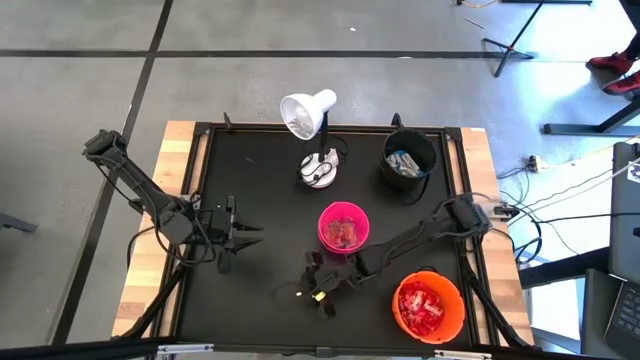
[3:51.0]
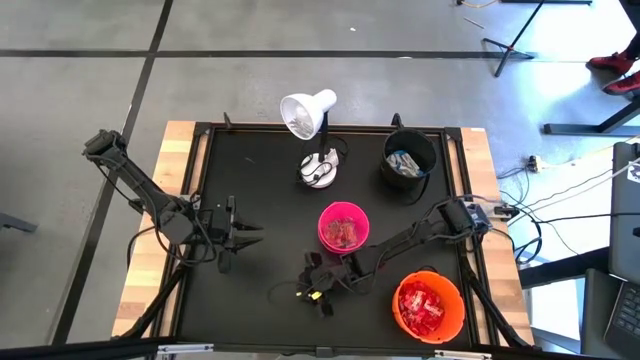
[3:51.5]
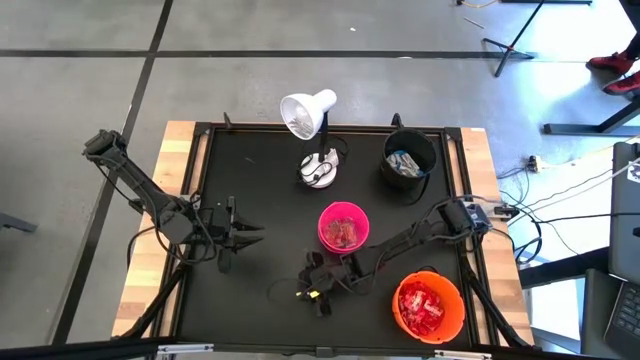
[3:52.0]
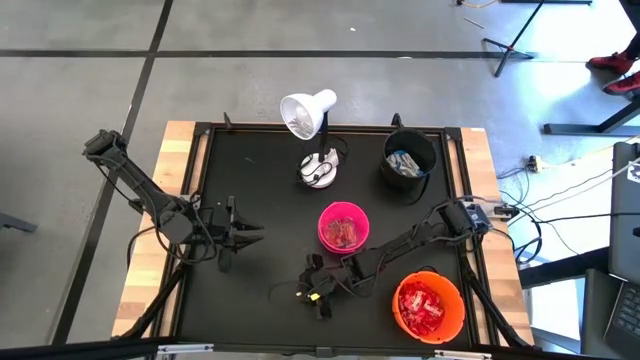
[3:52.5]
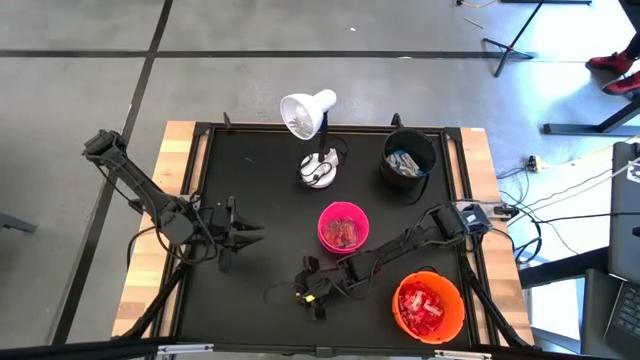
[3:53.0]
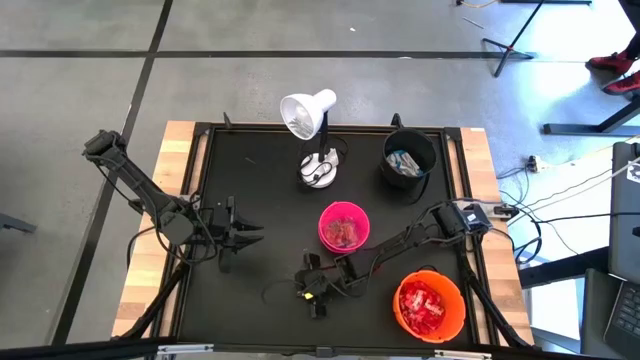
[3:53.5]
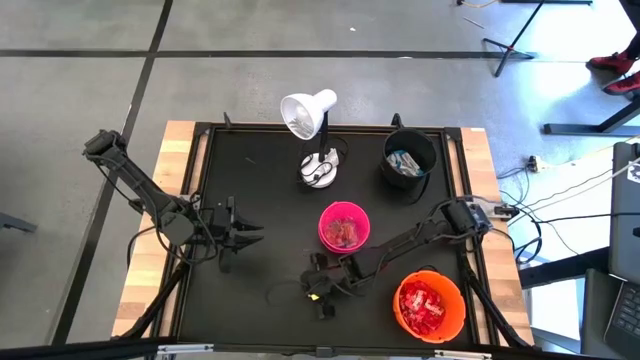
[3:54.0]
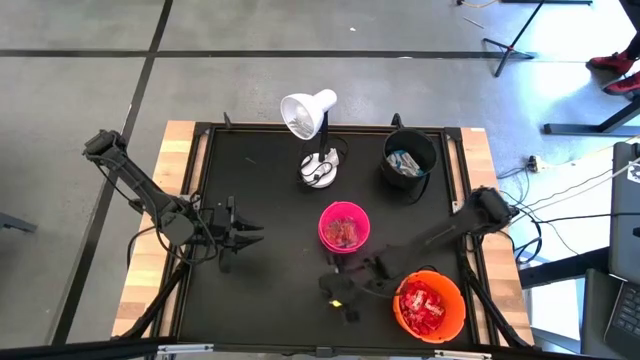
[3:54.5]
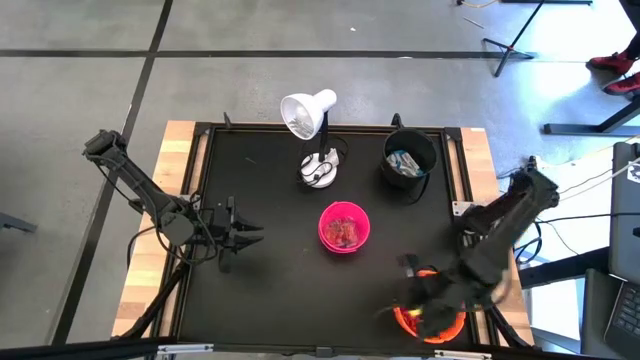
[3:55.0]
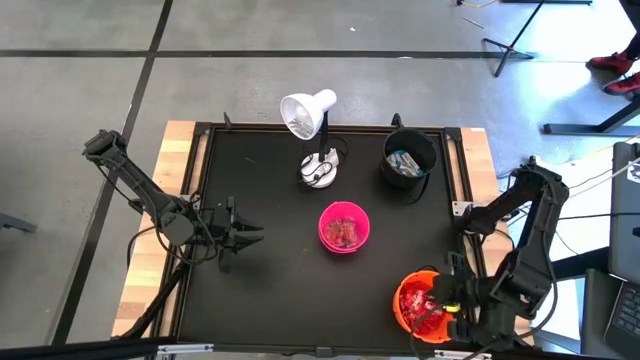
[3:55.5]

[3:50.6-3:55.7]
Task: Sort candy
Put the yellow candy into the orange bucket

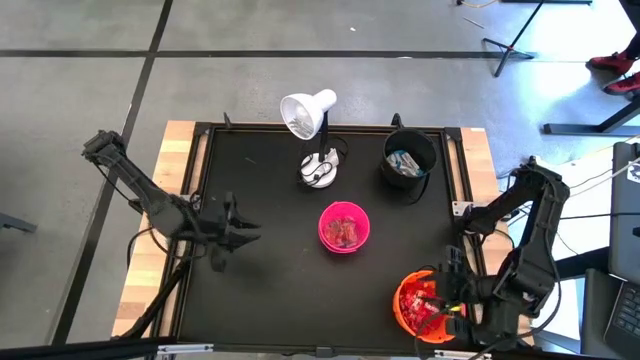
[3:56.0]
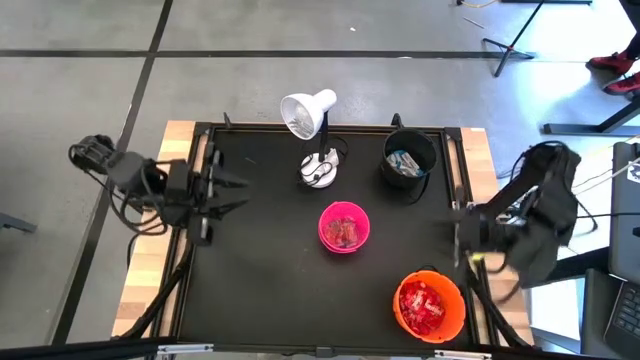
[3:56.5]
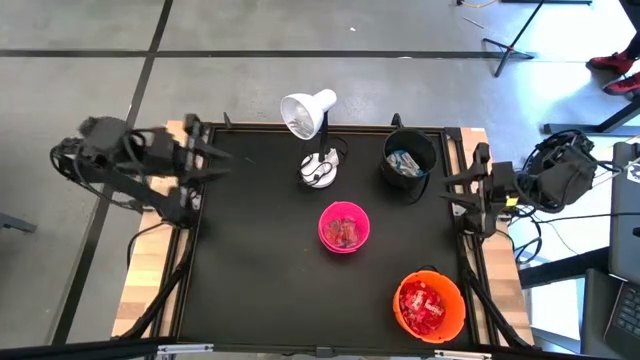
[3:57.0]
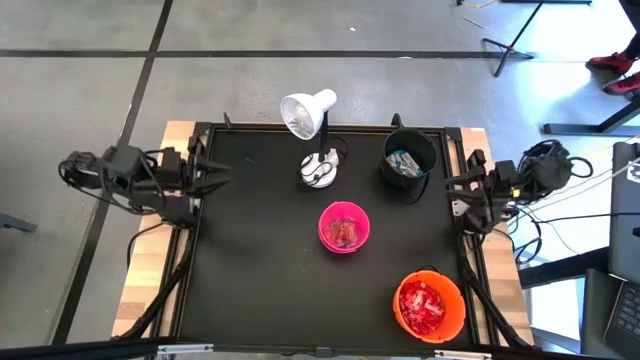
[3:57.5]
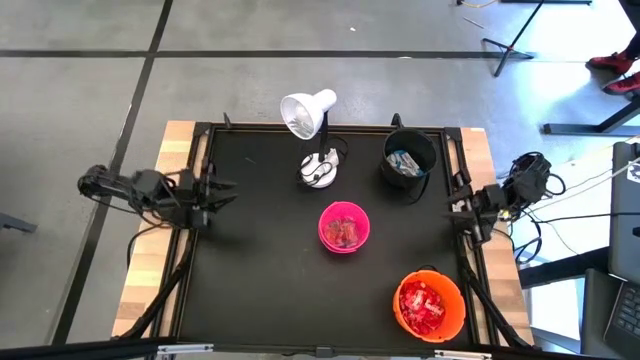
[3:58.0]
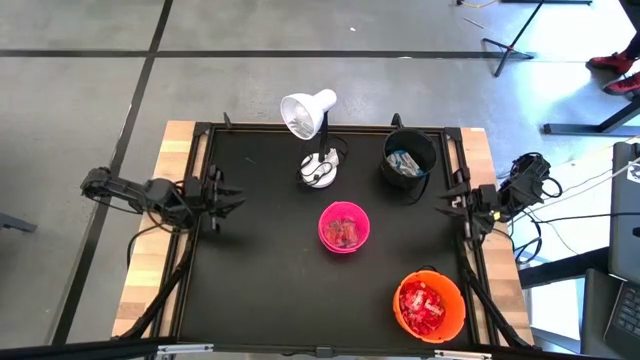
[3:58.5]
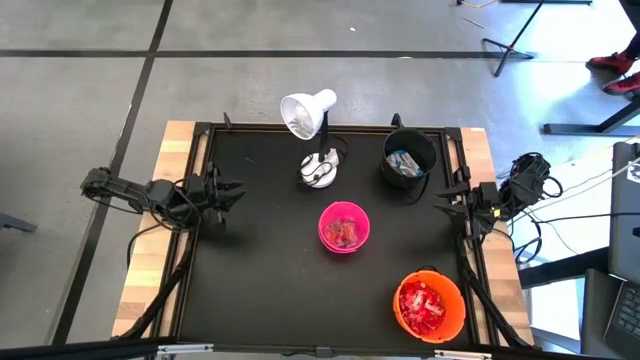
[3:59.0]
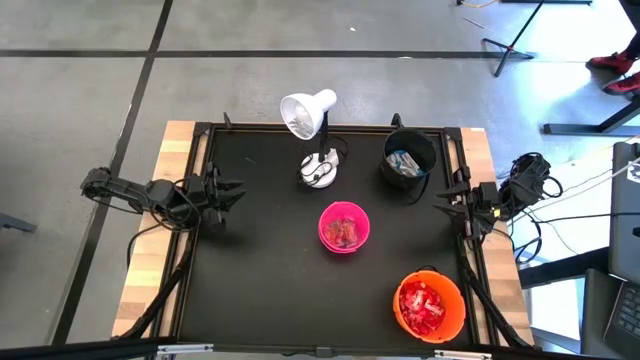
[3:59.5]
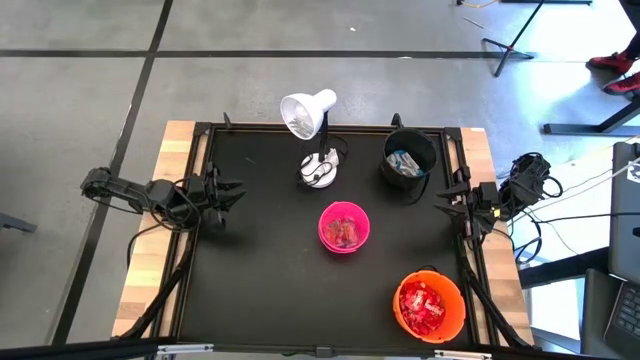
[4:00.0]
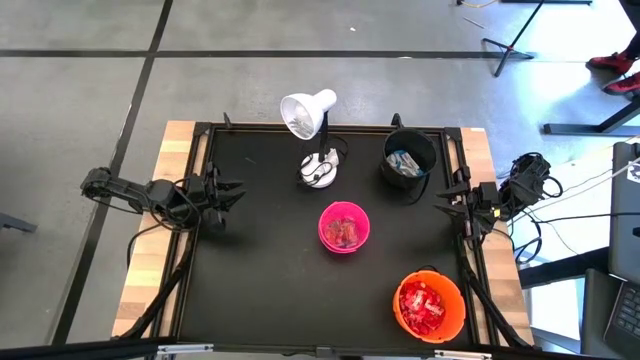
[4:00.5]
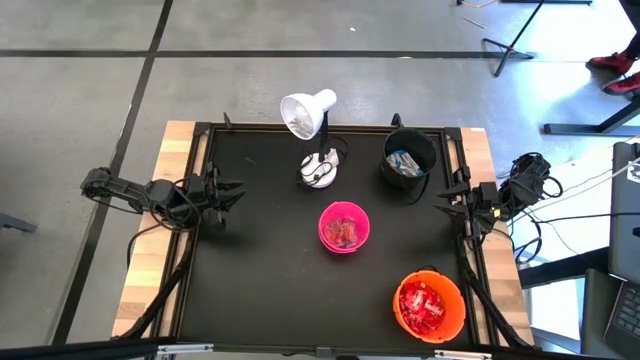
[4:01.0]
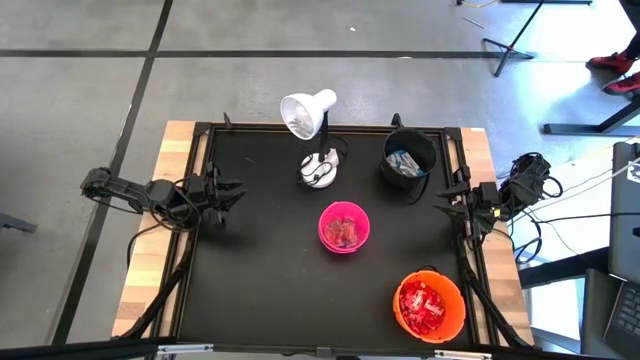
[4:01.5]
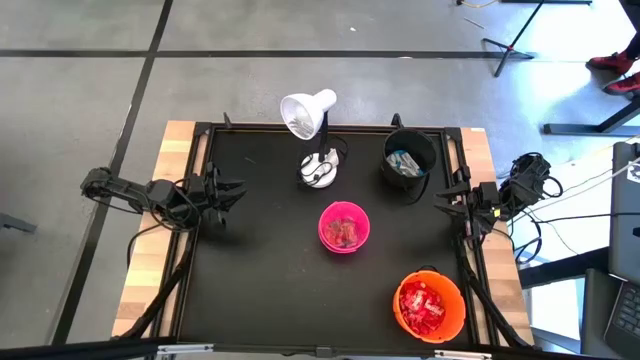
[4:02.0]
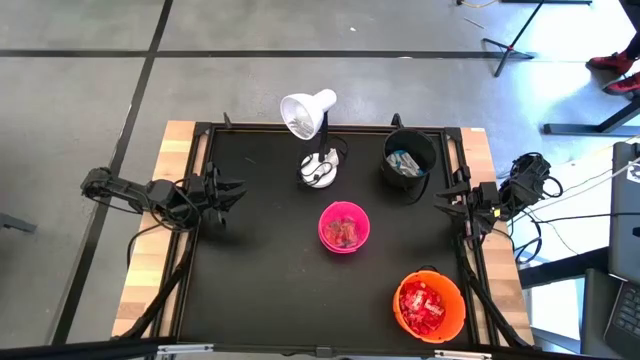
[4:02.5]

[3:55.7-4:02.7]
Return to Home Position

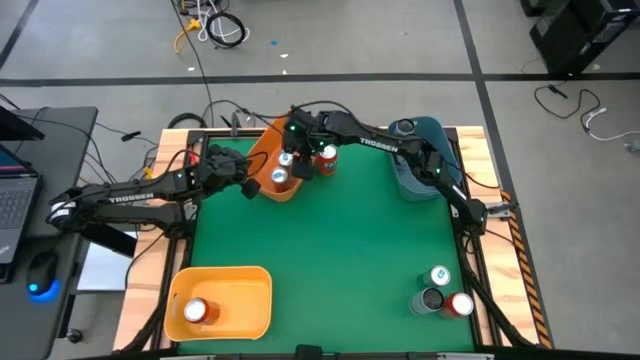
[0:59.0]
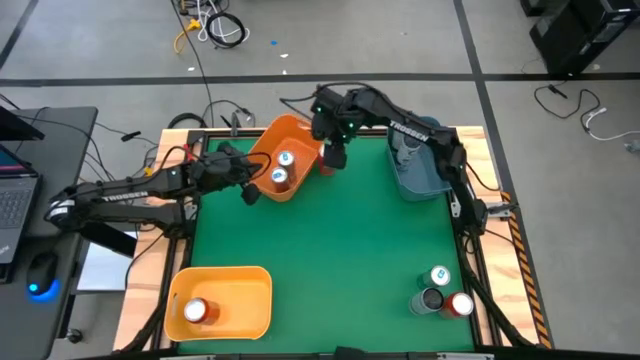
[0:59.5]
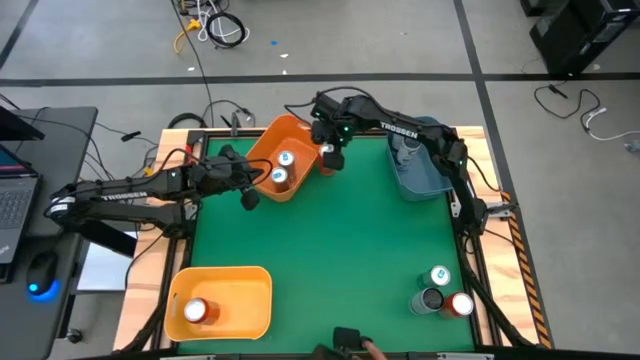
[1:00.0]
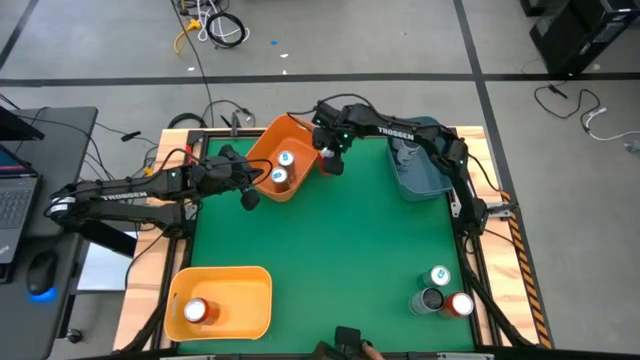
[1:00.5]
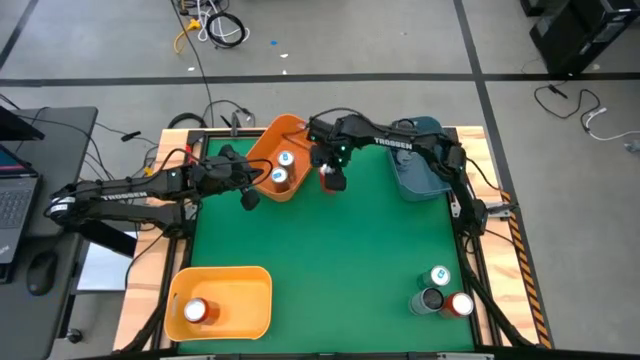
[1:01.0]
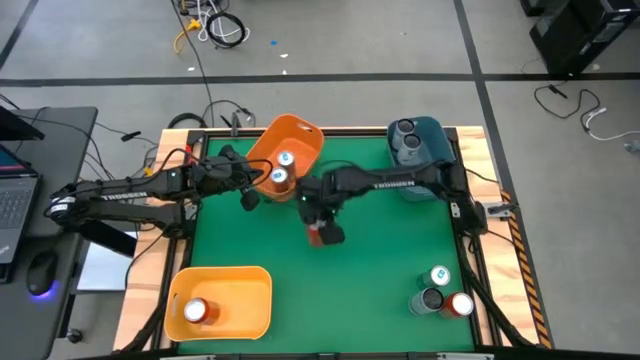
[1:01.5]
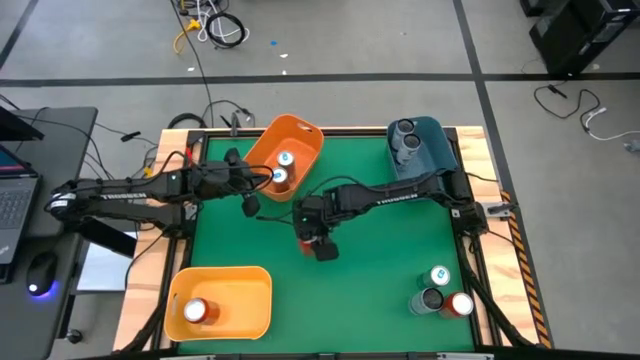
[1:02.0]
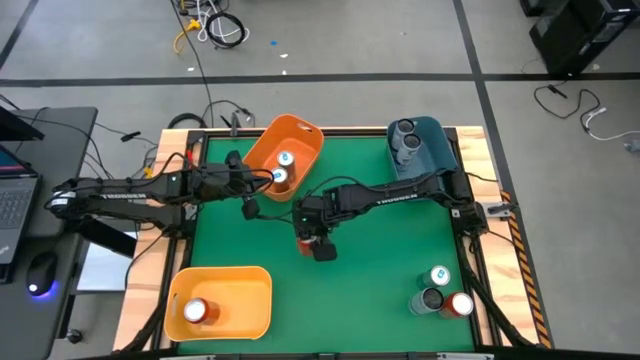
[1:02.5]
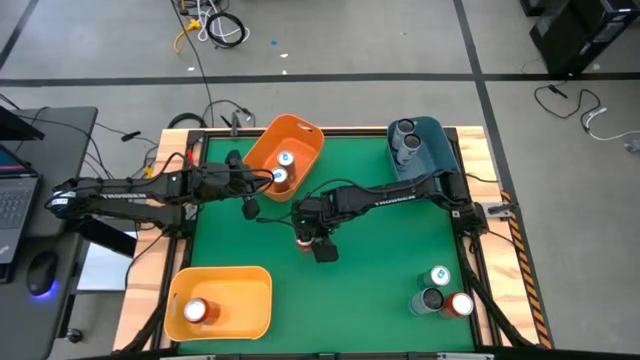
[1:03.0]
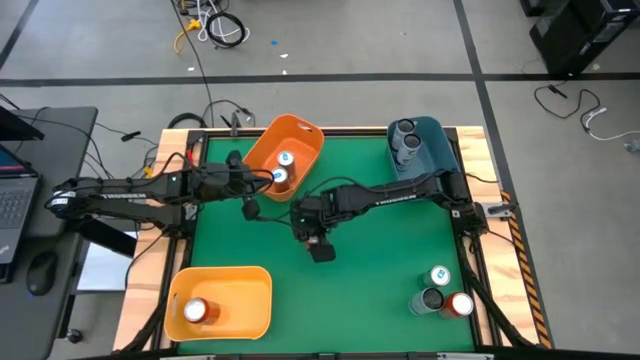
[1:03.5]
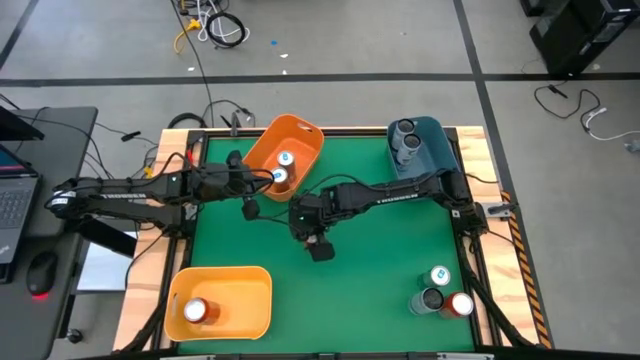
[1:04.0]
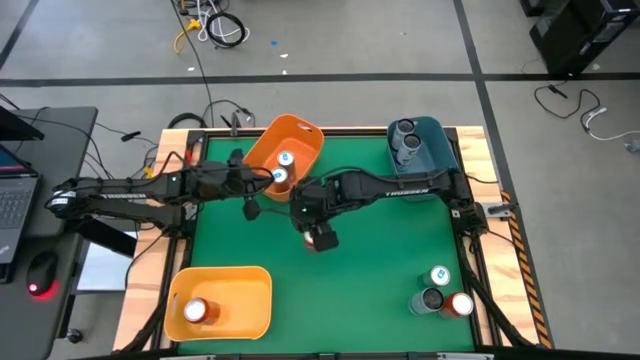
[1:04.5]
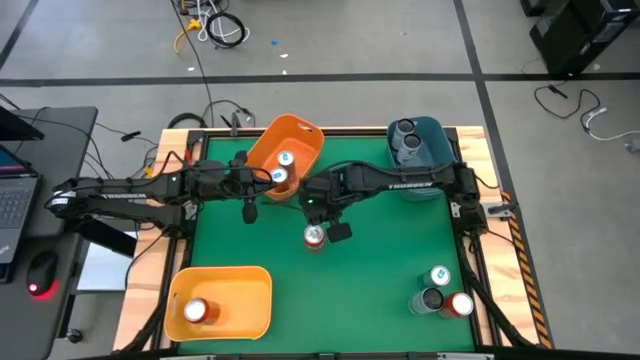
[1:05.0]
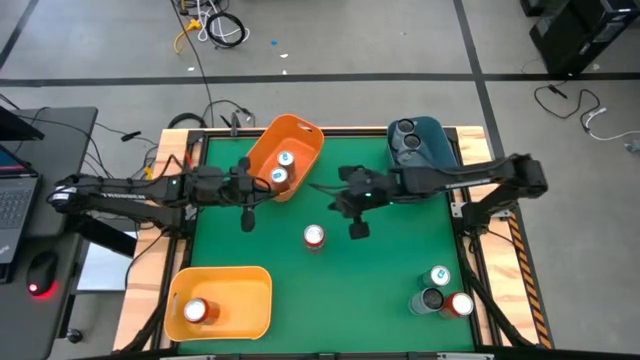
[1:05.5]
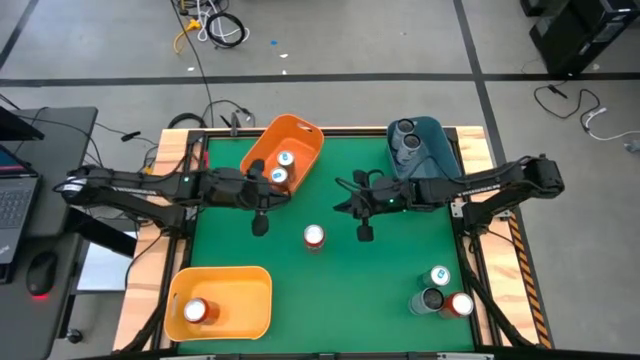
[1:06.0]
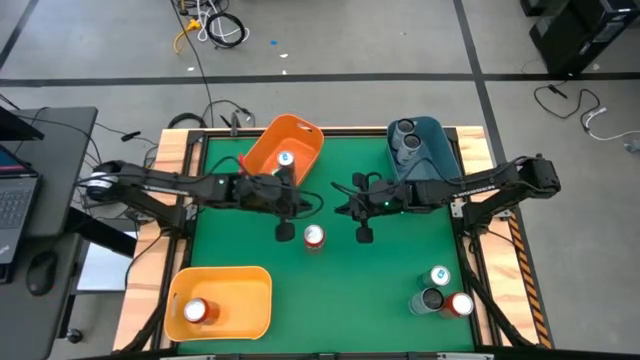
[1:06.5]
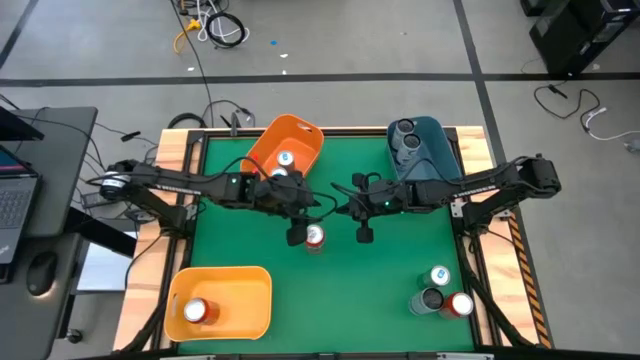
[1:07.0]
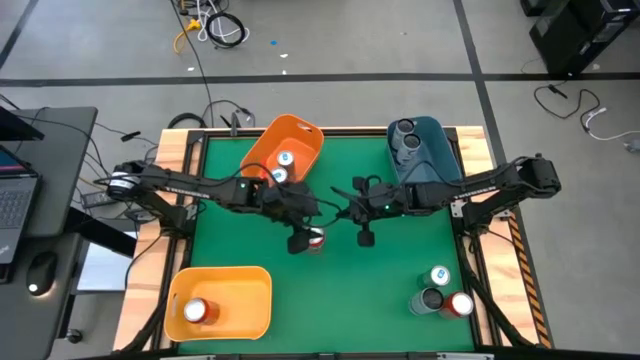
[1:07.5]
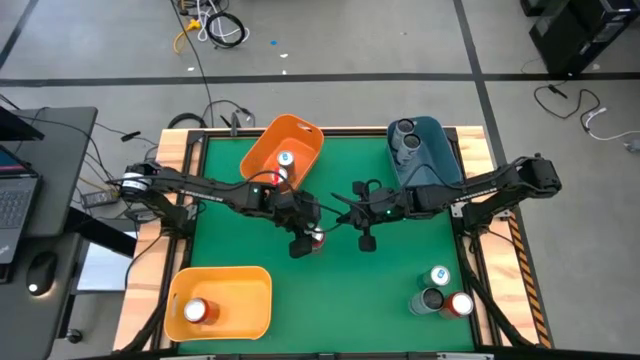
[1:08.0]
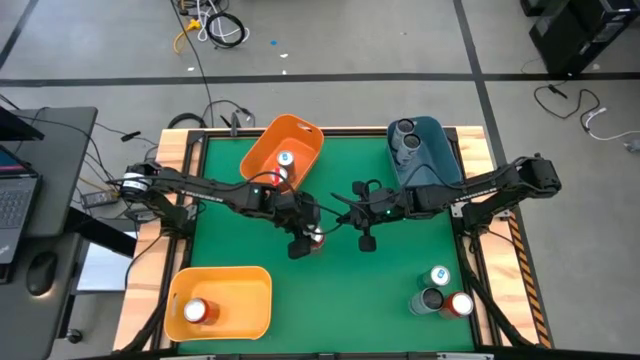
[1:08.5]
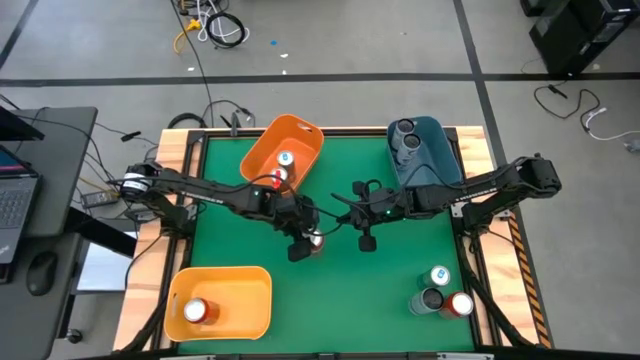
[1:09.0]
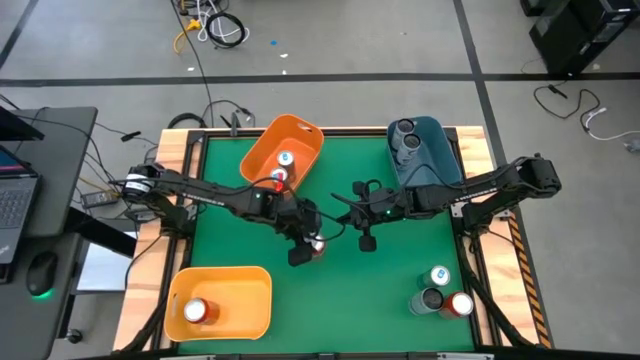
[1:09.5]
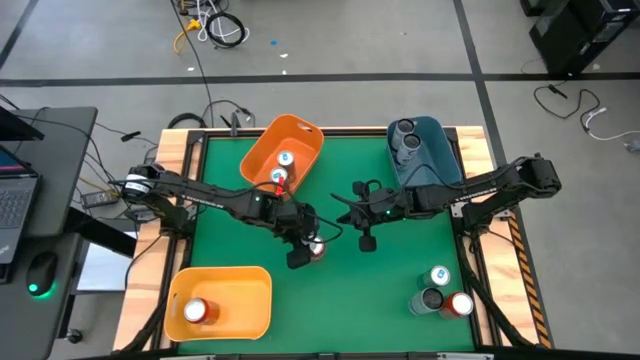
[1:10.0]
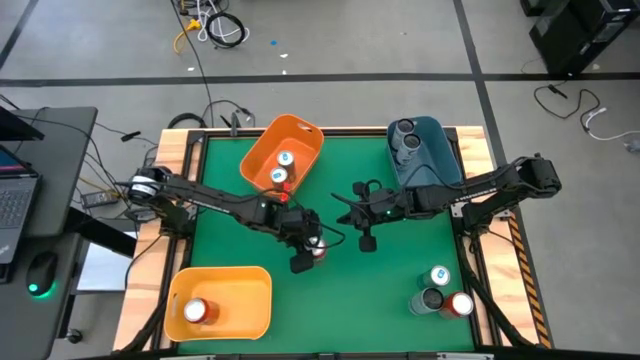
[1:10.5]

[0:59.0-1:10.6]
Task: Sort soda cans
Put the top orange soda can into the yellow bin
